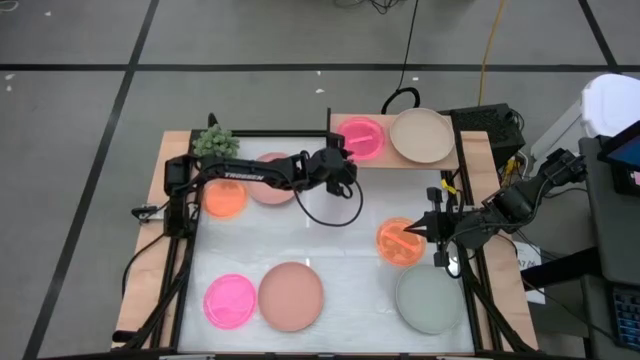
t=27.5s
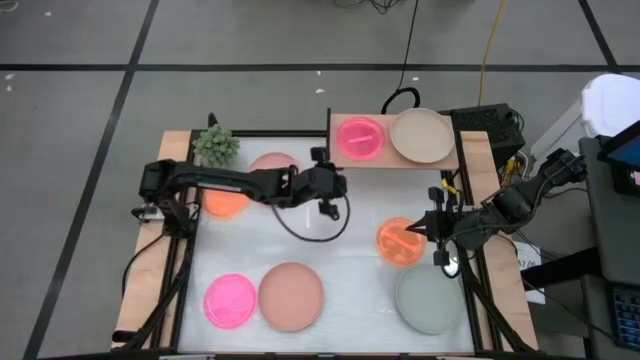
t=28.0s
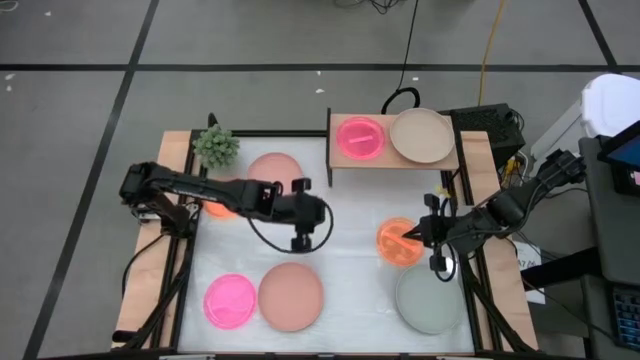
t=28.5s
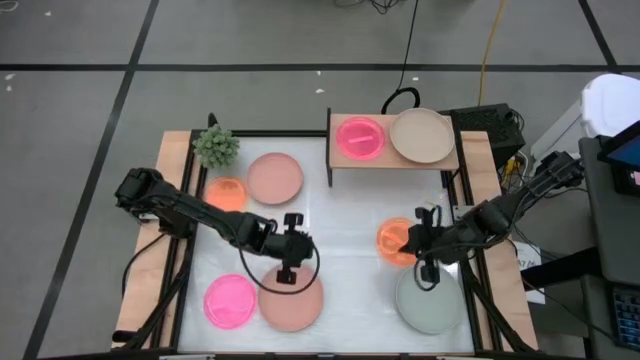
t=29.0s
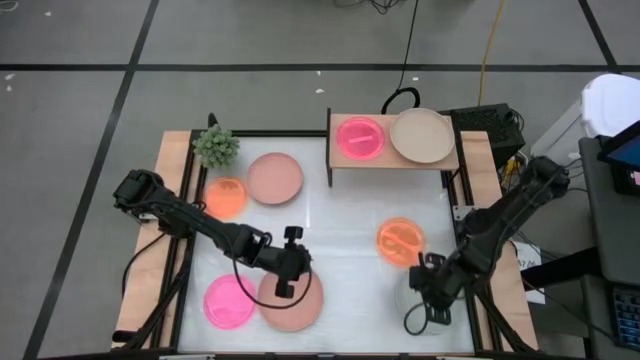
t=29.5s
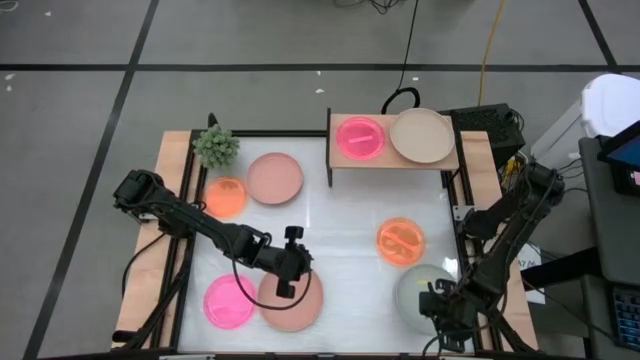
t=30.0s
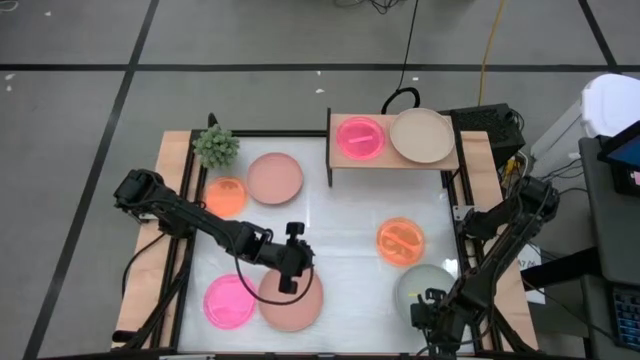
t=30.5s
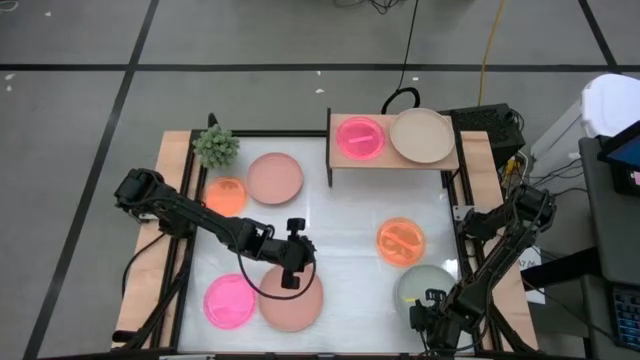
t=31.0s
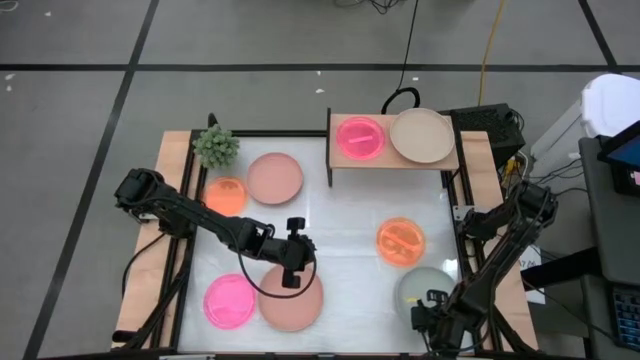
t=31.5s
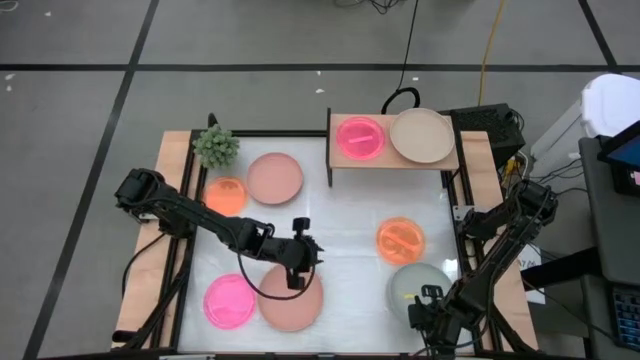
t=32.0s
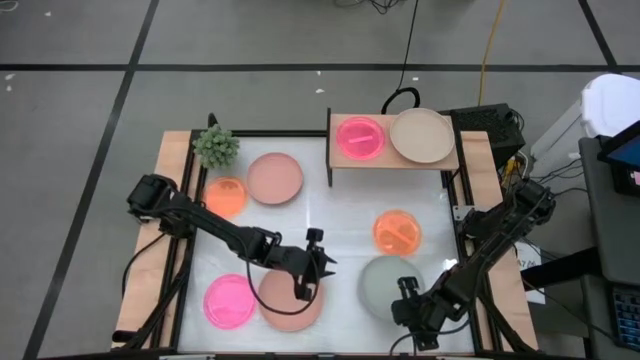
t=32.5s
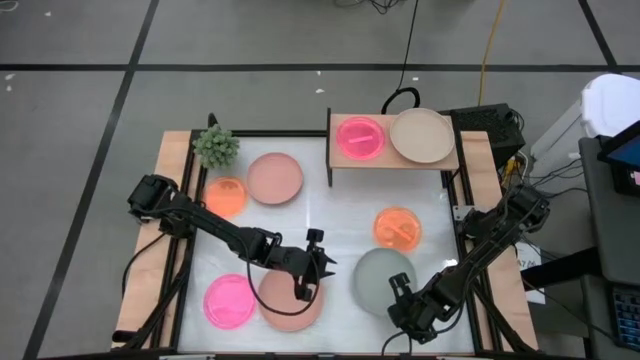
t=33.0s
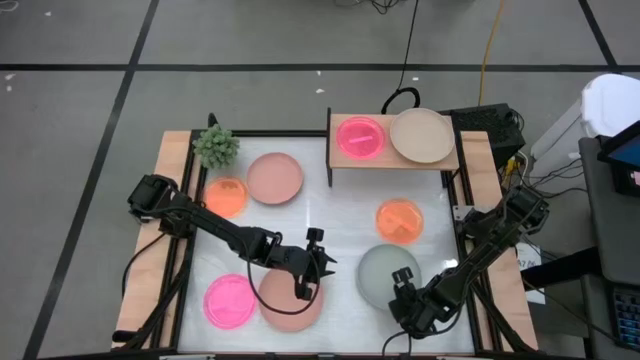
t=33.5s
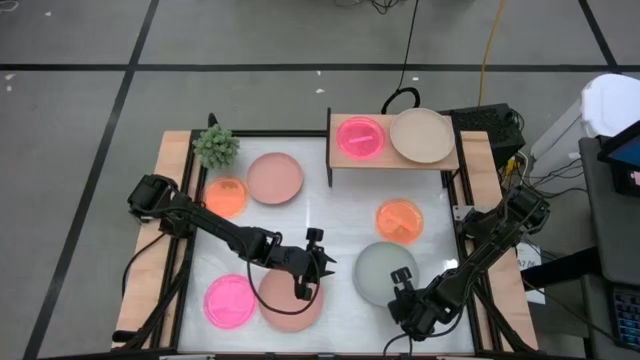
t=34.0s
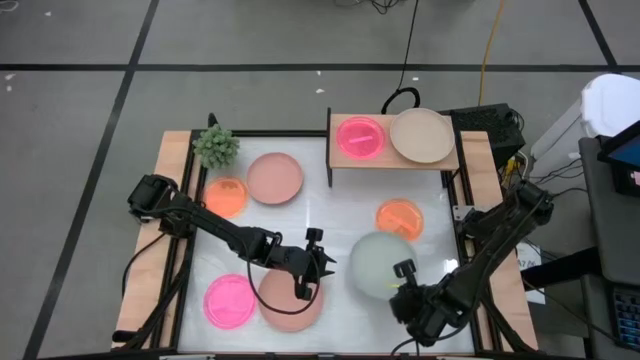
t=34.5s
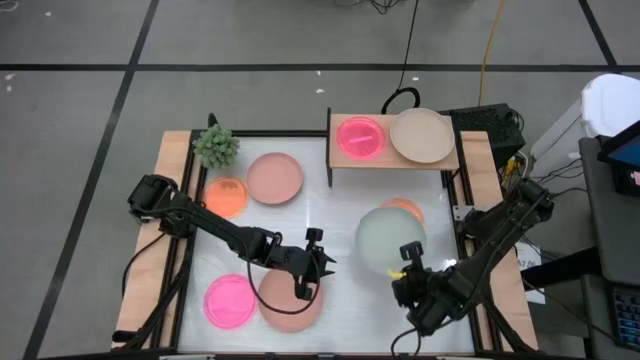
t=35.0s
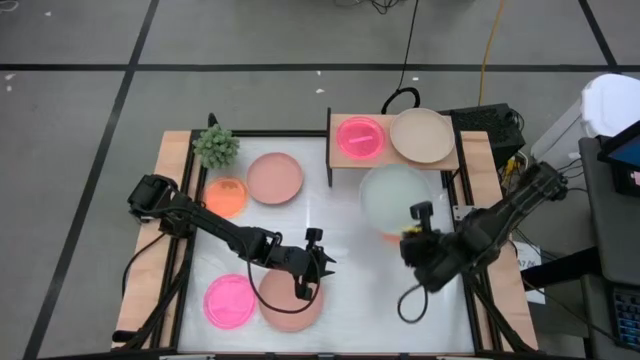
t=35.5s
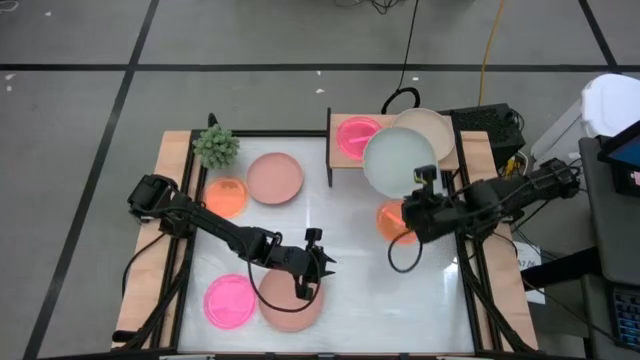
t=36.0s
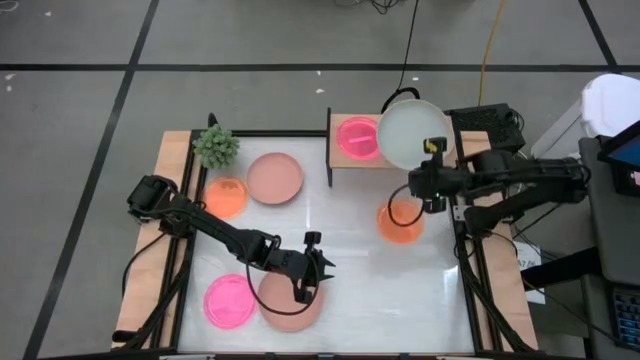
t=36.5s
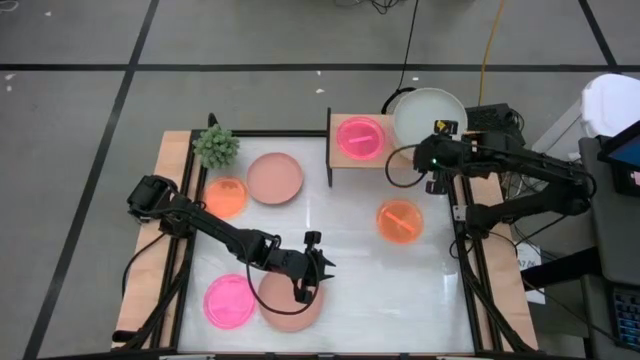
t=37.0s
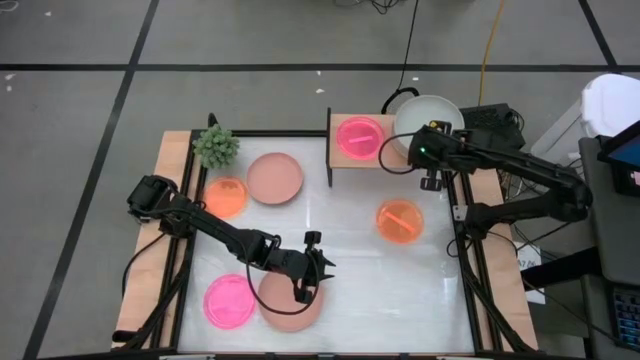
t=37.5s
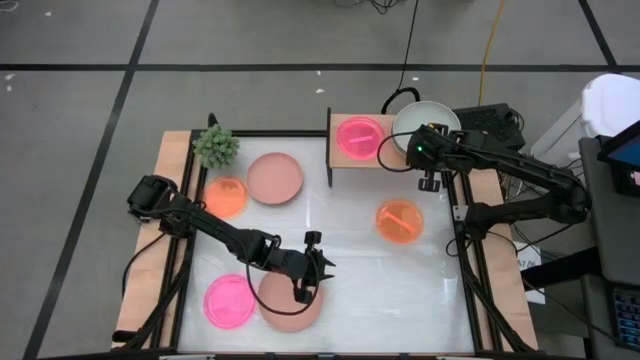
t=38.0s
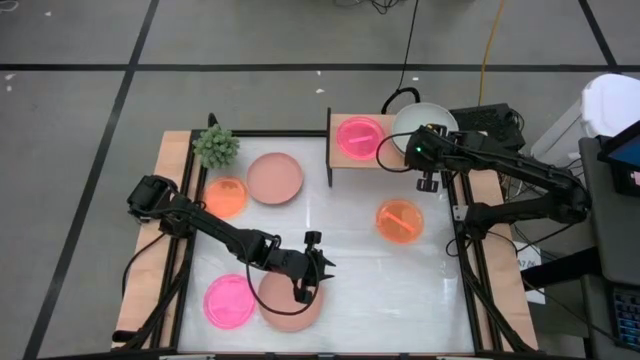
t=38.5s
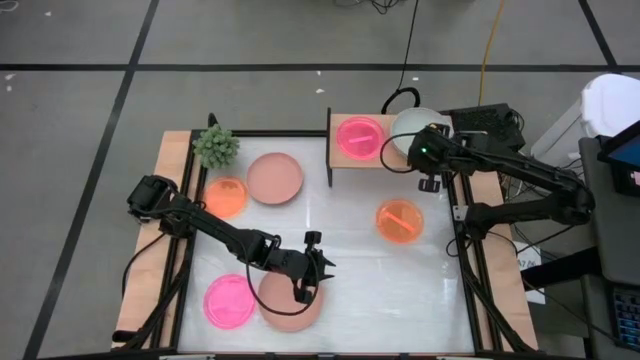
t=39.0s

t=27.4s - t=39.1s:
Task: Place and stack plates onto a shelf
Stack the gray plate on top of the brown plate on the shelf

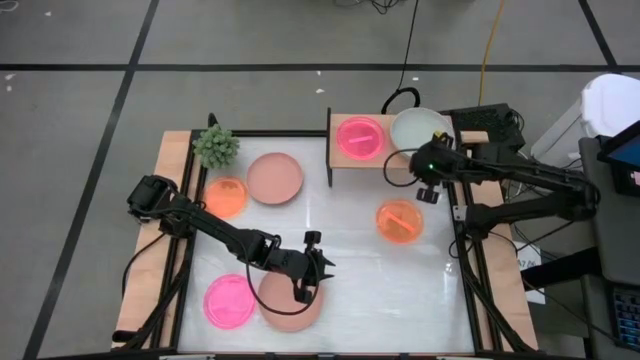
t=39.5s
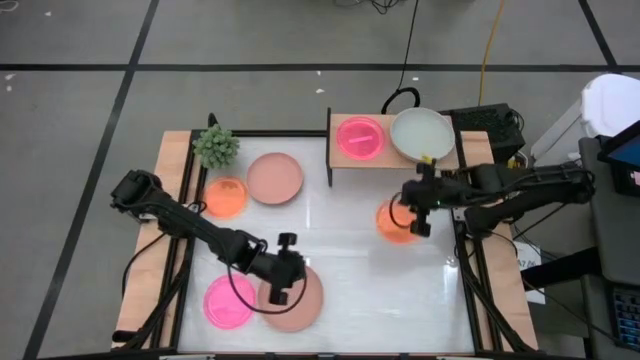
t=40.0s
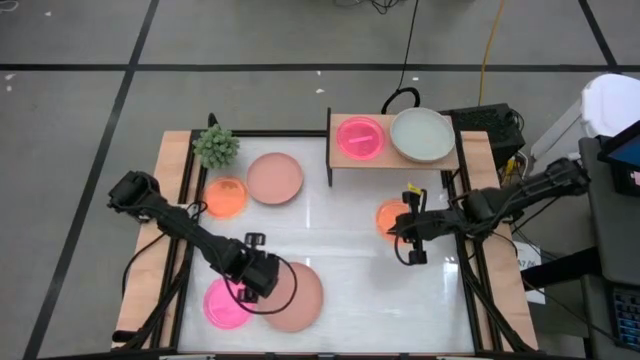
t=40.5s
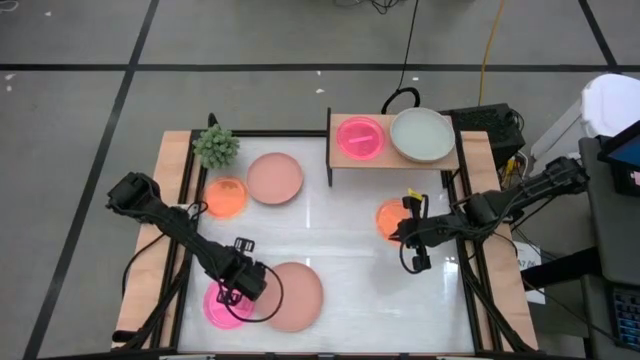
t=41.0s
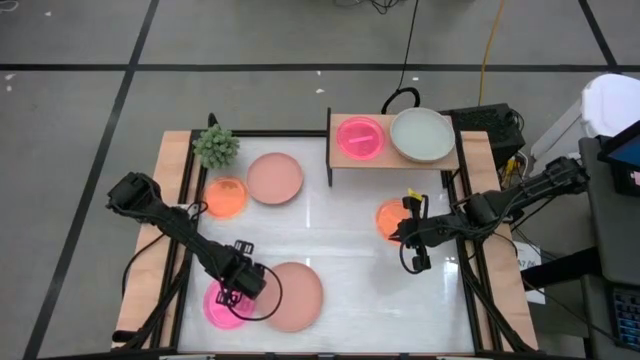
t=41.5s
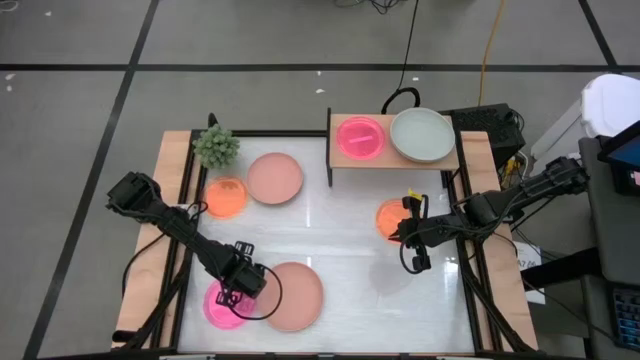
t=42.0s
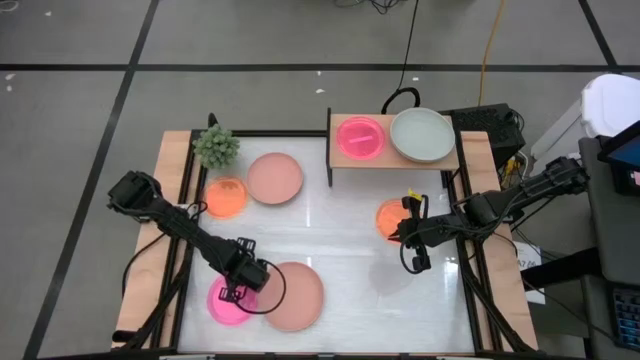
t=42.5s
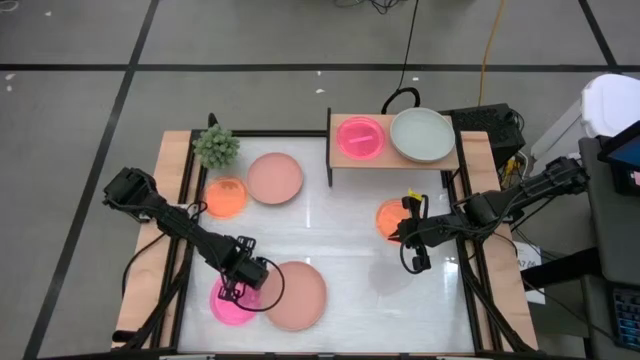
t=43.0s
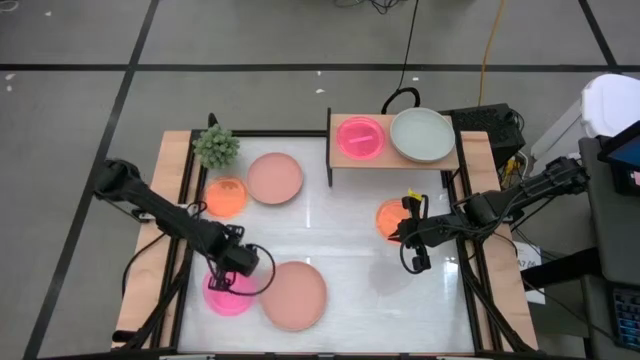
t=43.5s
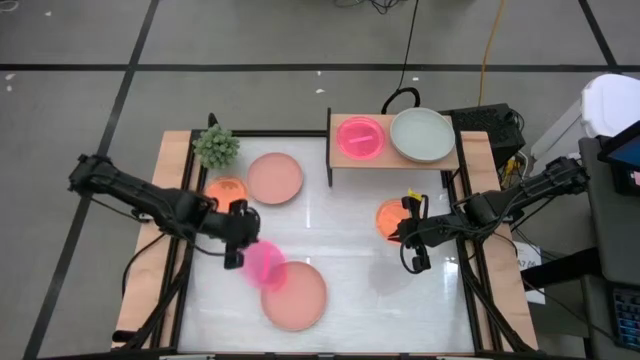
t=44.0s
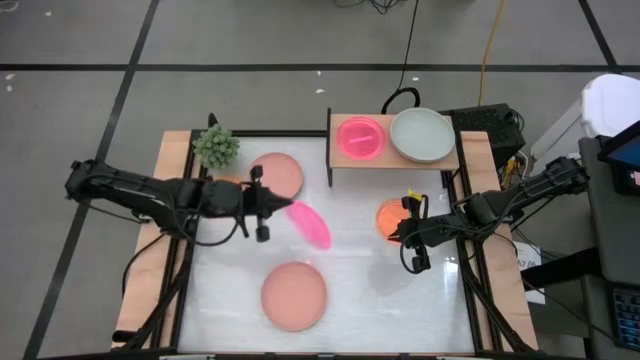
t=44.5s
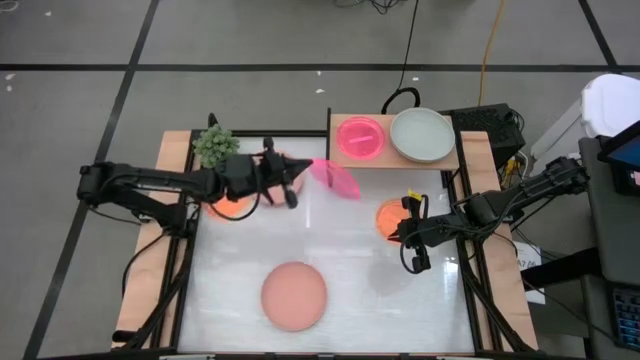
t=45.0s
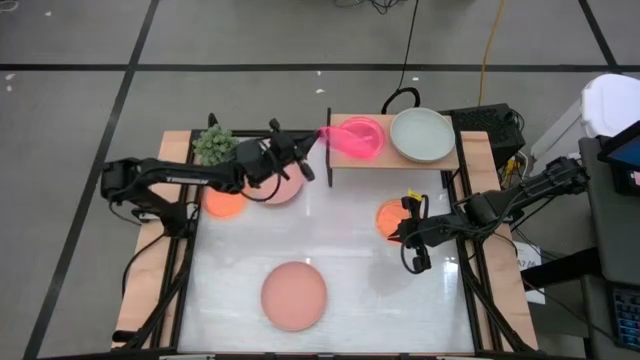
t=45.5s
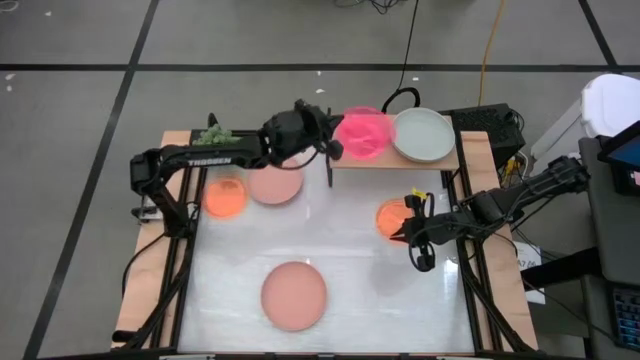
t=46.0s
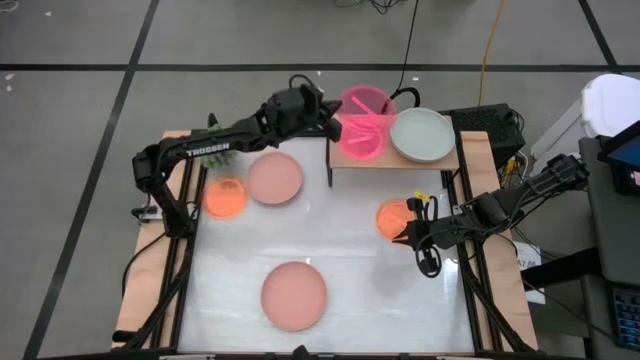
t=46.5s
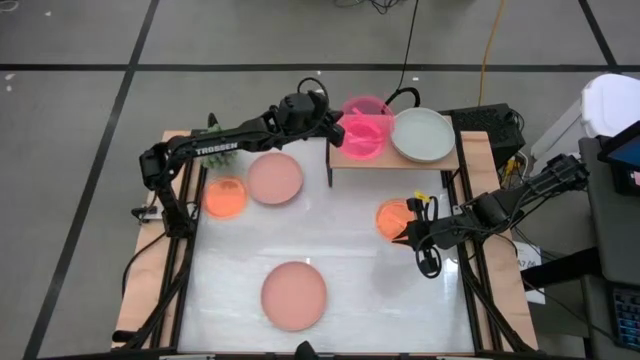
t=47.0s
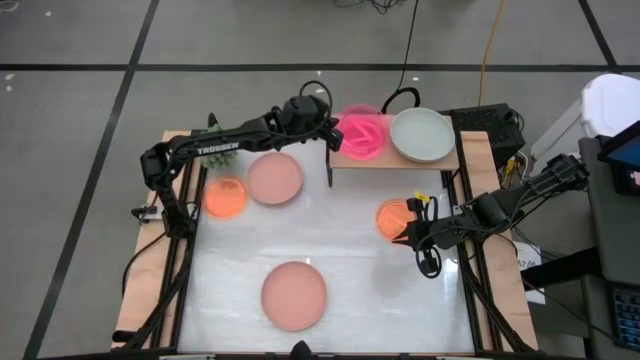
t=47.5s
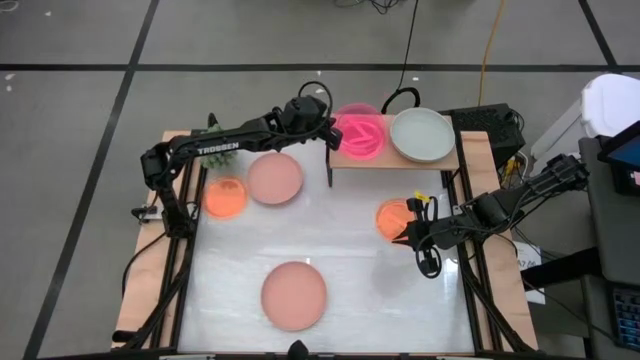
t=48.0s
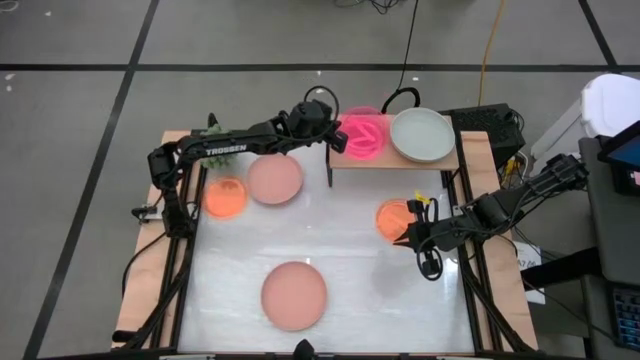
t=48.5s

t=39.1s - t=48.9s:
Stack the light pink plate on top of the other light pink plate on the shelf

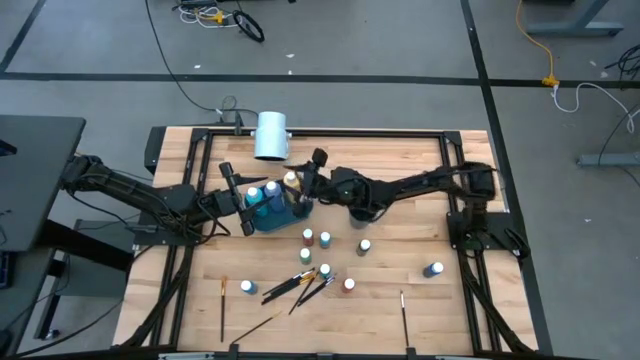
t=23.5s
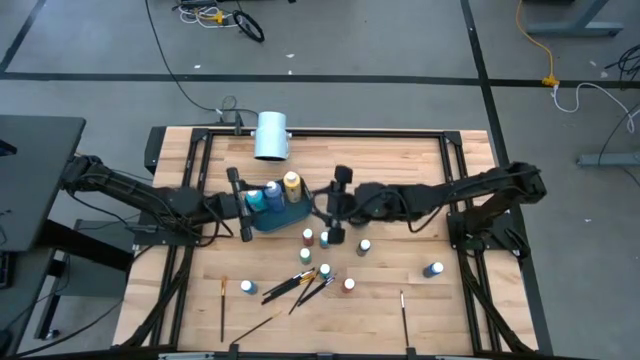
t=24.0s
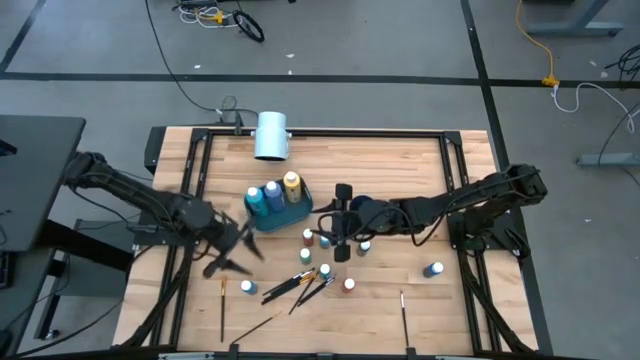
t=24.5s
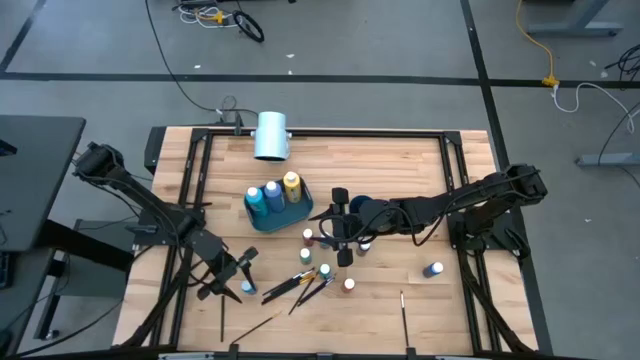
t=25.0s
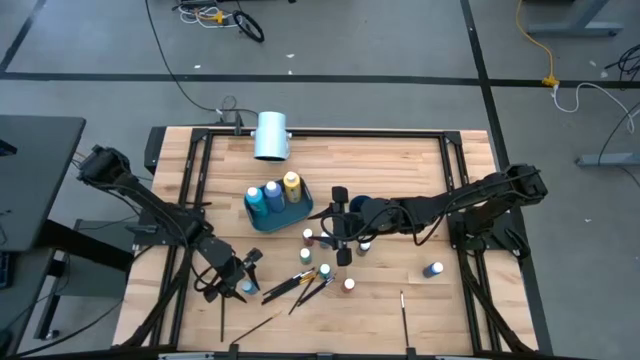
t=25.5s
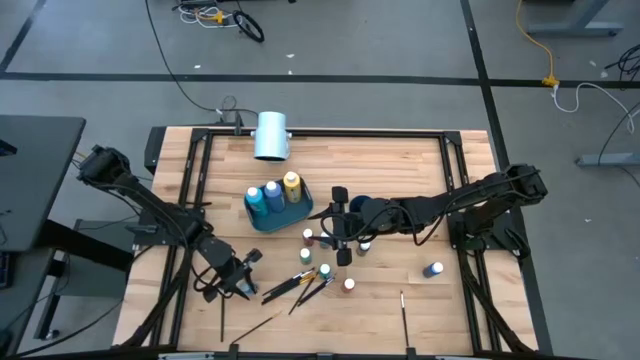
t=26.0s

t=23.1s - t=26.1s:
Task: Pick & Place Paint Supplies
Put the blue paint bottle into the blue bin
